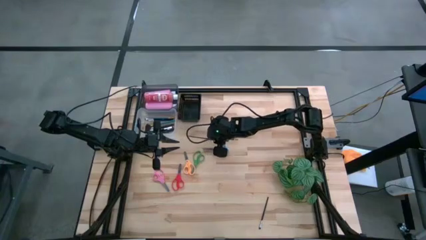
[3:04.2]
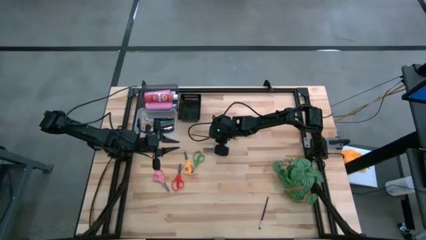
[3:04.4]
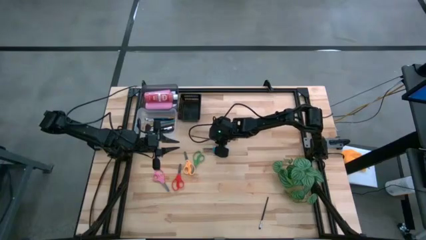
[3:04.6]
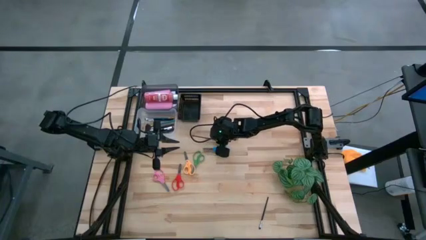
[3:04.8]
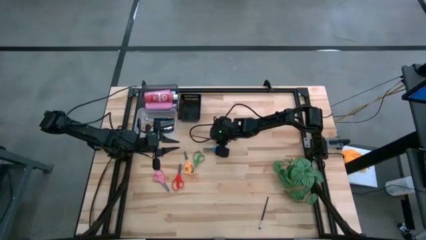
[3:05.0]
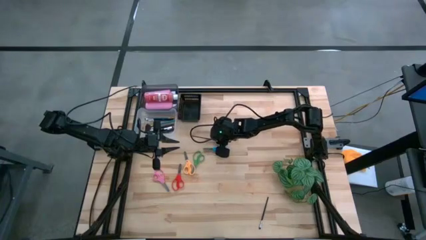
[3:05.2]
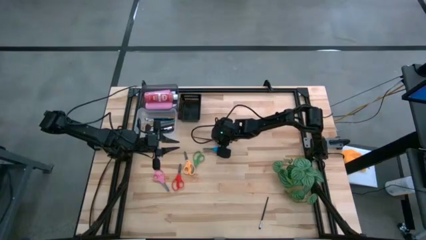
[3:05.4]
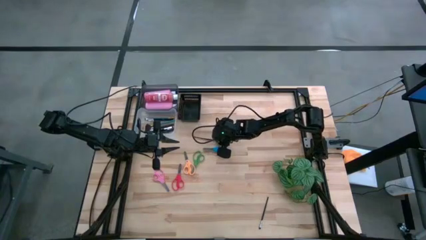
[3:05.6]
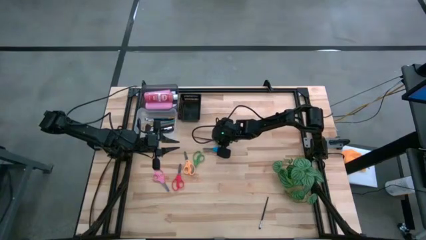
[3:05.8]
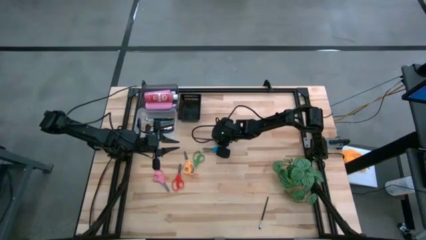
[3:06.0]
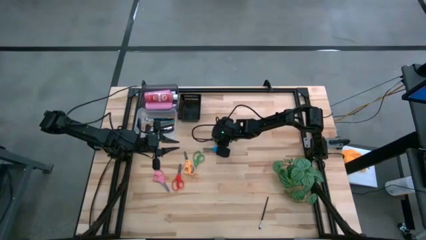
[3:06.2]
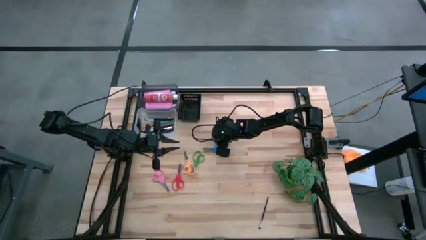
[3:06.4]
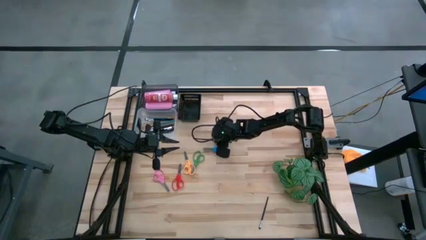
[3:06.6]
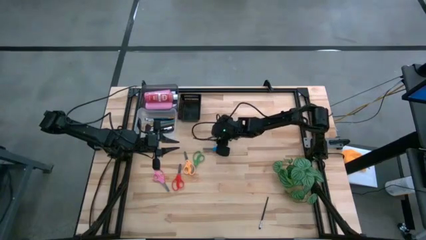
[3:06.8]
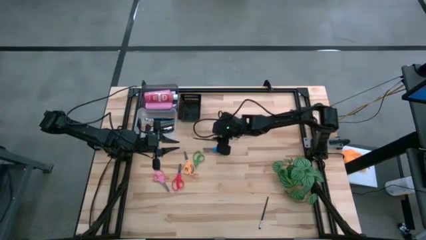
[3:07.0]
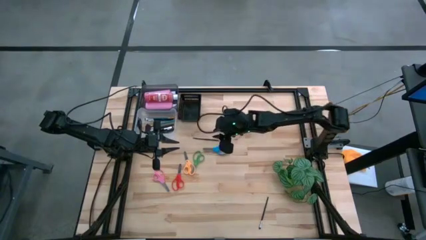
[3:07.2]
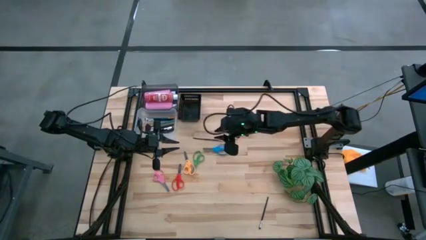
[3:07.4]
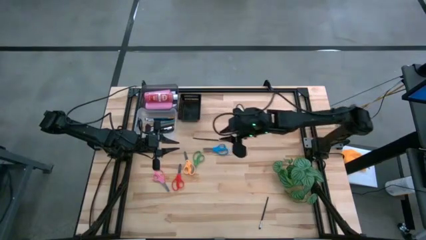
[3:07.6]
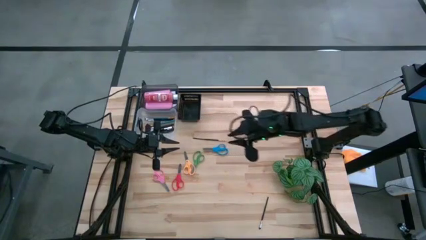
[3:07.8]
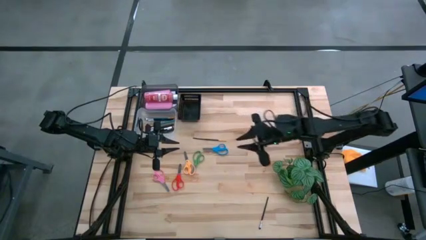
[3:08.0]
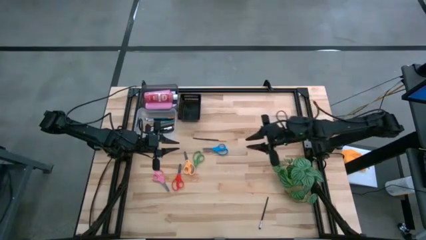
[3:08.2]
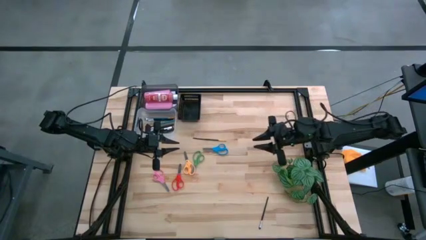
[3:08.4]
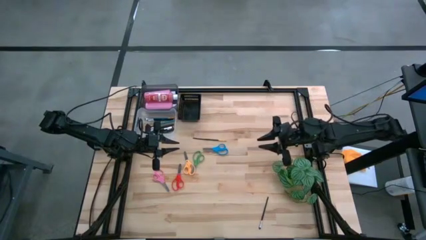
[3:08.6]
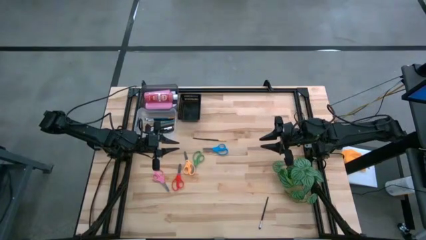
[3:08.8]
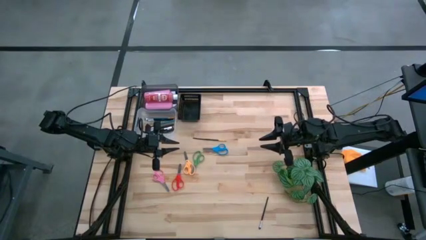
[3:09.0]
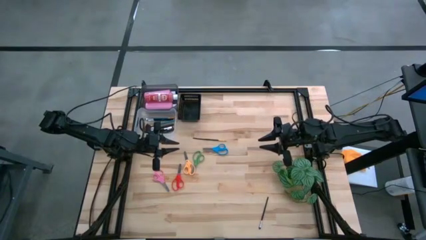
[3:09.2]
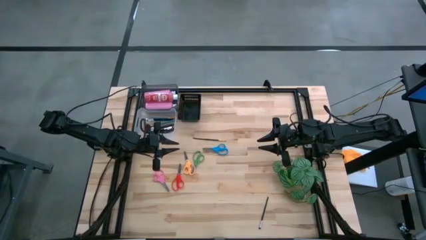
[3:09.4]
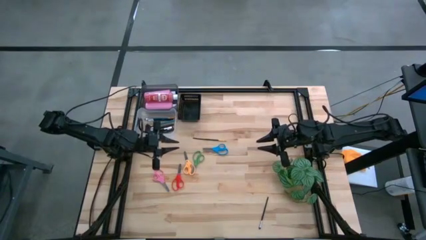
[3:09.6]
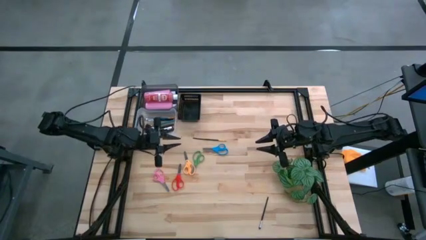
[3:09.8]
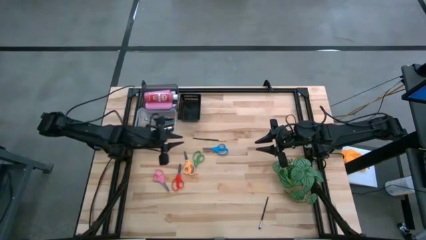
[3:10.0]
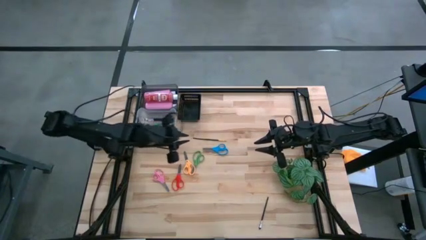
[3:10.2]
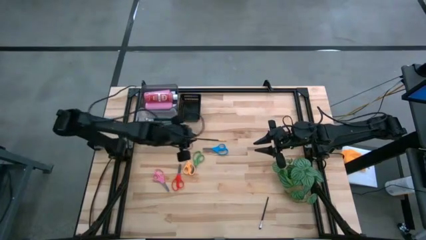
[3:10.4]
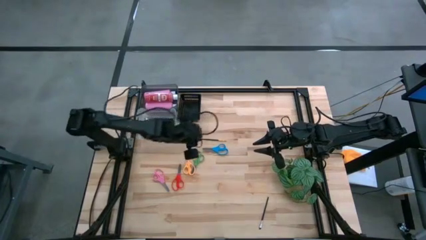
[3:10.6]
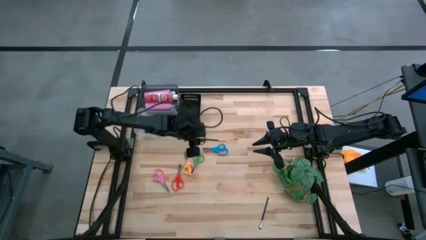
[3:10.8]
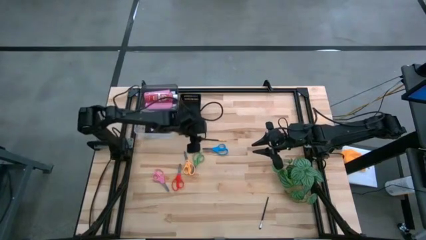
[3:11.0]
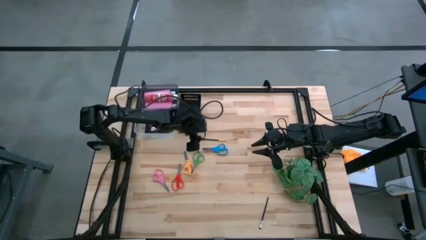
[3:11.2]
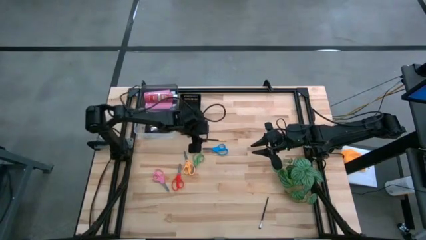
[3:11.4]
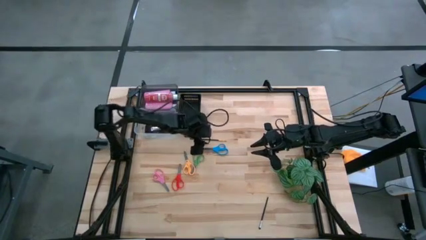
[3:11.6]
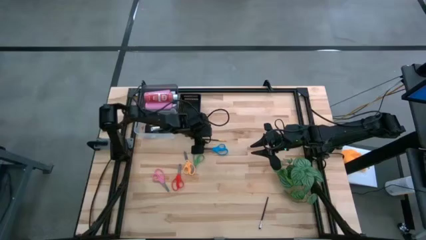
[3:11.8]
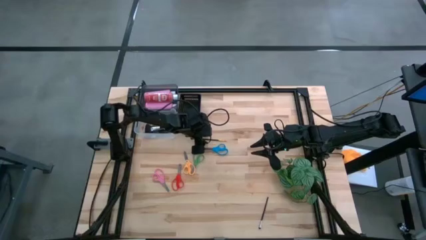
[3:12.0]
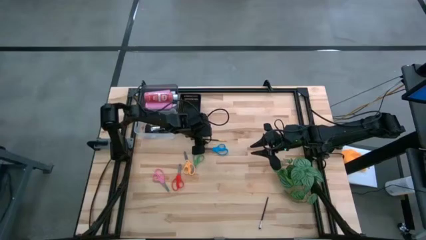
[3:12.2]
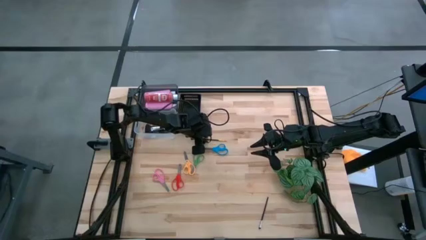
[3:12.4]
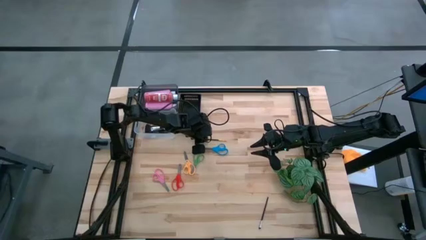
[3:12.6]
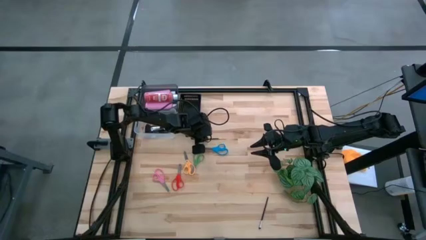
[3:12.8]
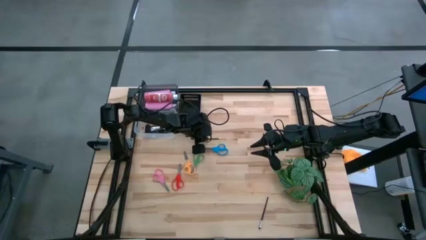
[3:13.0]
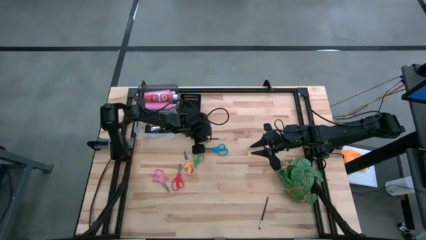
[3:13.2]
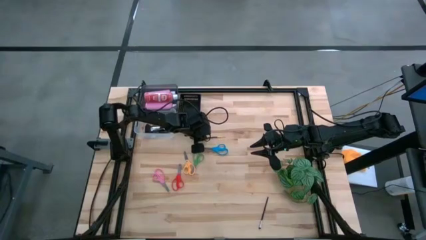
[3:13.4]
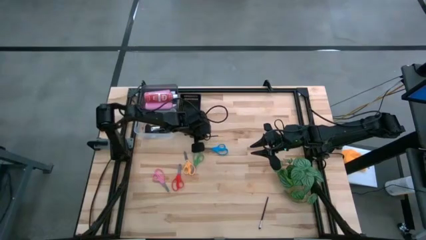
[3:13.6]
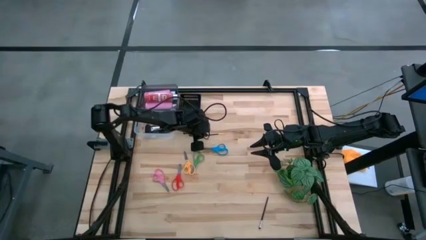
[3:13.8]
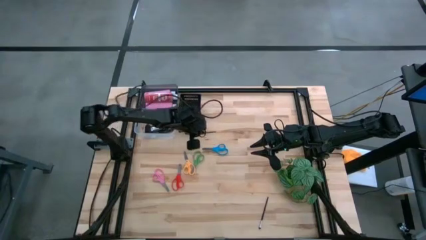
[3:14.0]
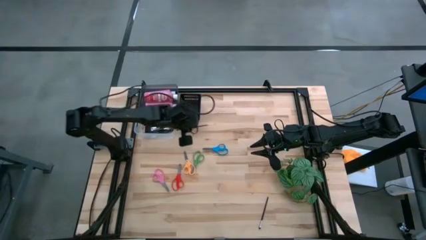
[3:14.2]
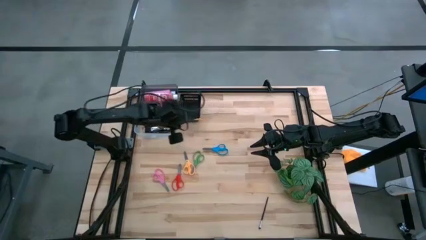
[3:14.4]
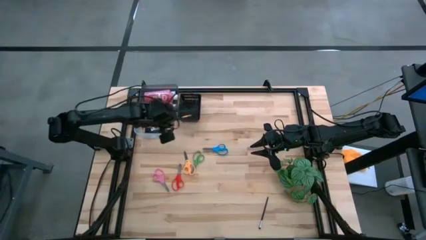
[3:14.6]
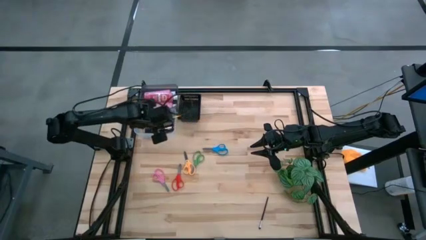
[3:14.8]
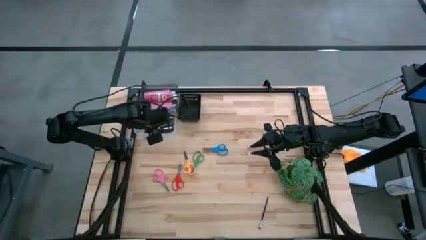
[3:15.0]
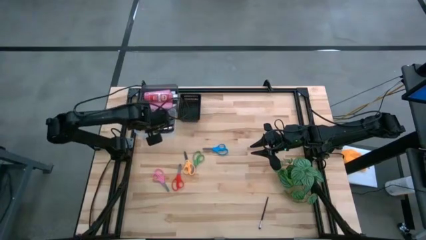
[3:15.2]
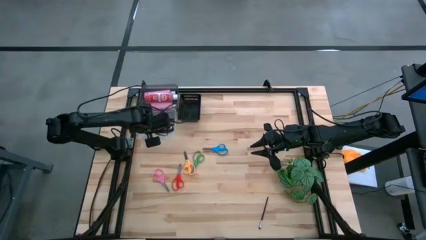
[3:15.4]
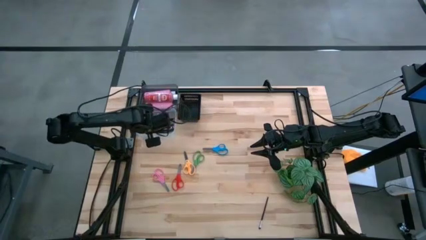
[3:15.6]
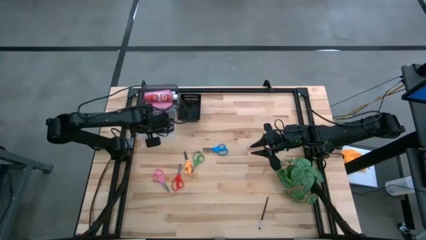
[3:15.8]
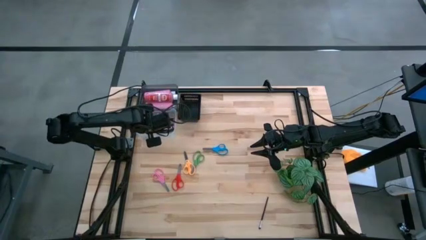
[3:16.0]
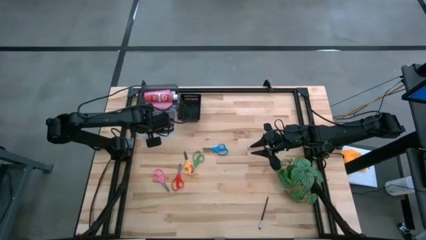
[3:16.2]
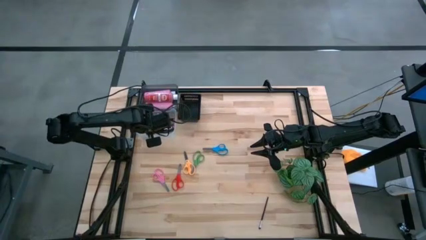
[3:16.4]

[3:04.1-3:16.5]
Task: Pick & Place Paint Supplies
Put the black paint brush into the transparent bin

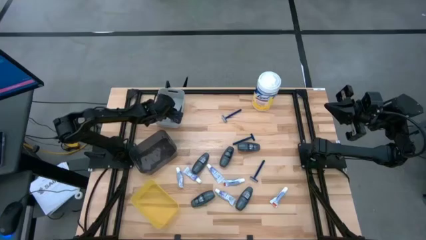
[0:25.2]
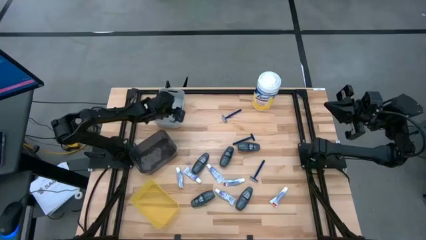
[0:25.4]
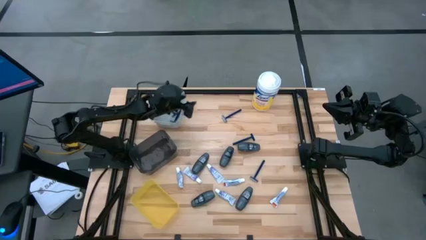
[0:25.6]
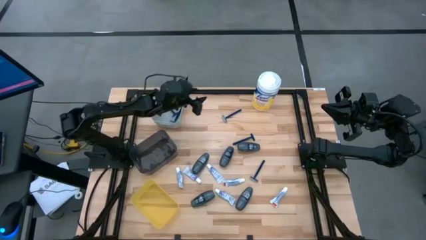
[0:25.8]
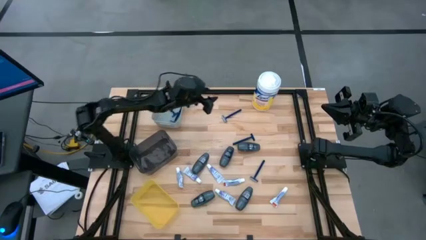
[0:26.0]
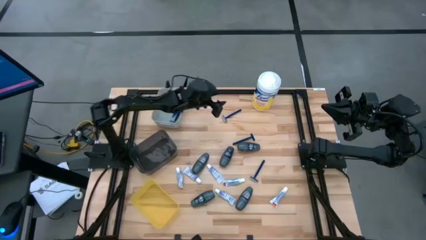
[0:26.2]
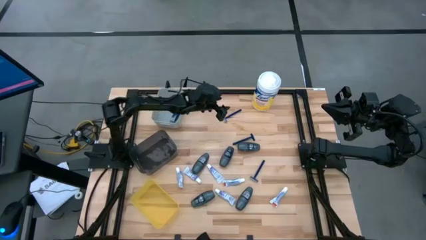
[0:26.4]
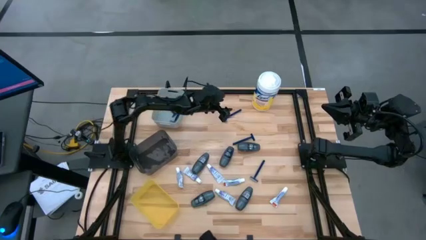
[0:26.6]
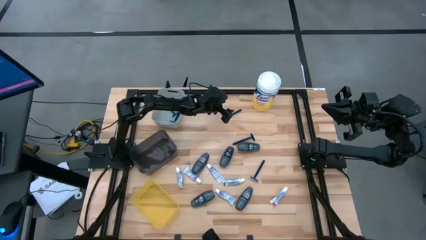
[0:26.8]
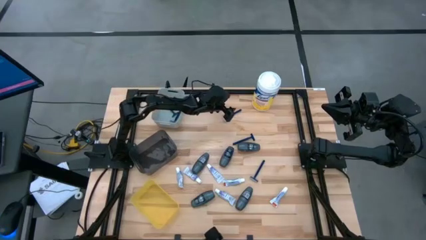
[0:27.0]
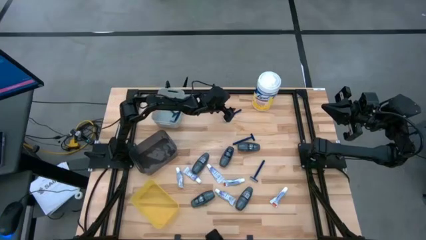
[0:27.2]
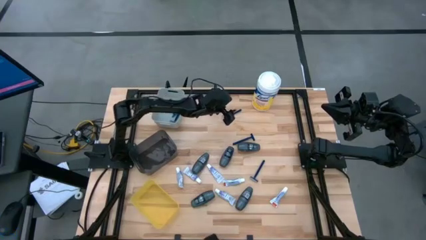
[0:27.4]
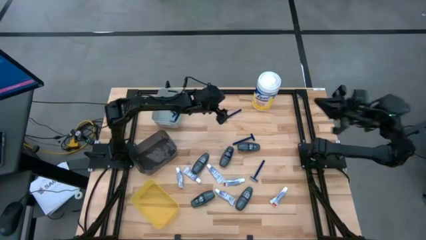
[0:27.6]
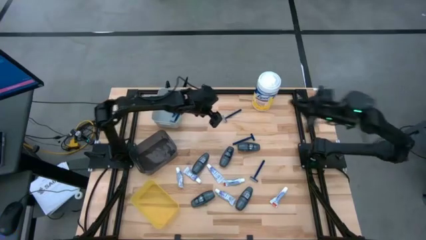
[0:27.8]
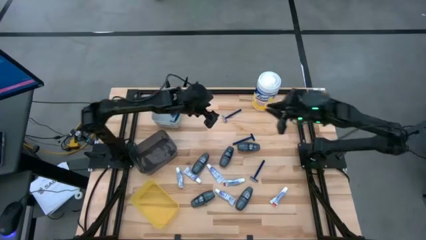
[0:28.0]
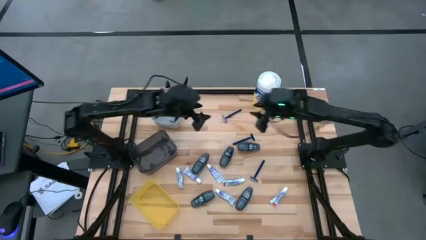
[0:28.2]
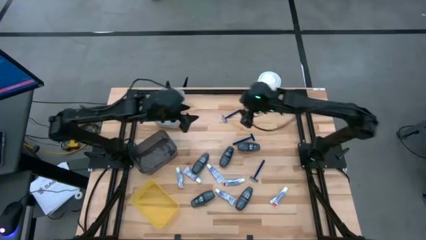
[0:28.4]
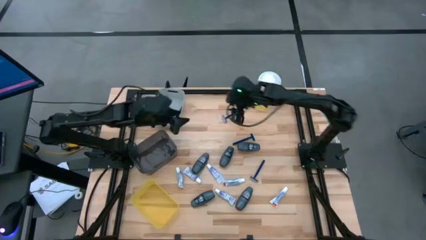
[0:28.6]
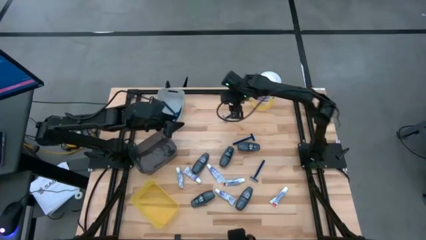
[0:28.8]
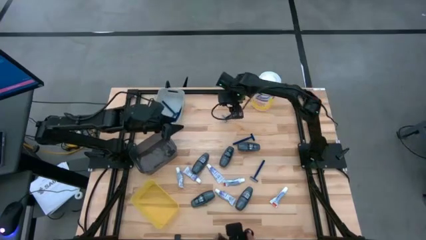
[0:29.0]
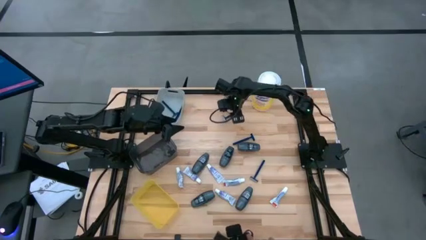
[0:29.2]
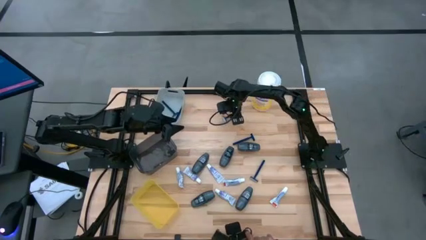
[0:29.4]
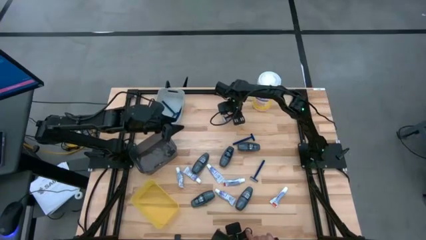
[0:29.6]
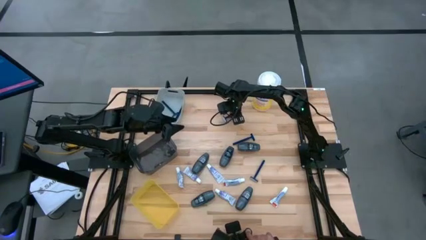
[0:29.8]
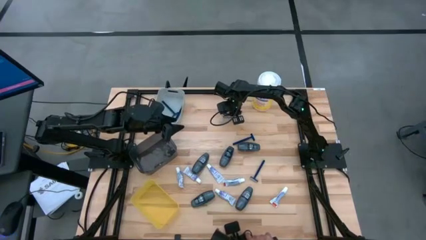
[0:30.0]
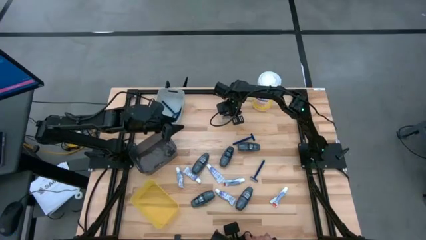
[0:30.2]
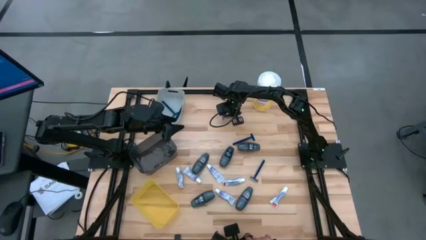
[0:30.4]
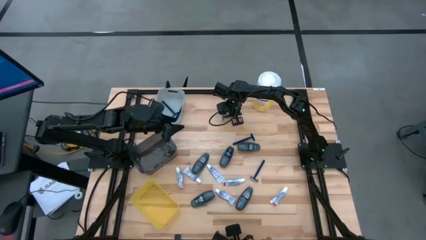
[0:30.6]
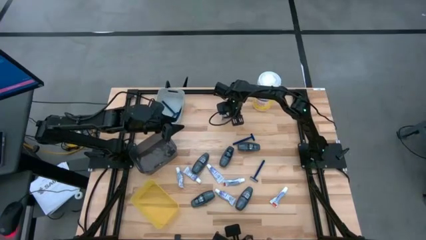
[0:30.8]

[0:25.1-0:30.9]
Task: Pick & Place Travel size toiletries
Put the razor into the gray bin put the razor into the gray bin
